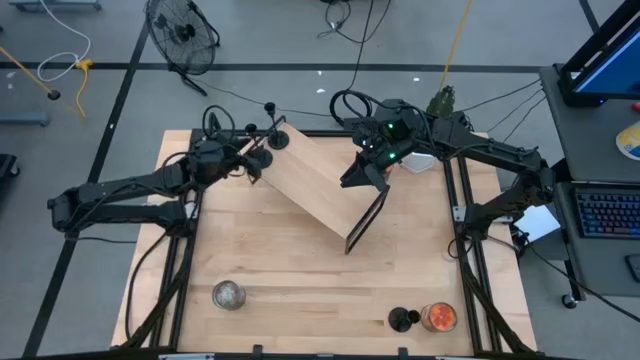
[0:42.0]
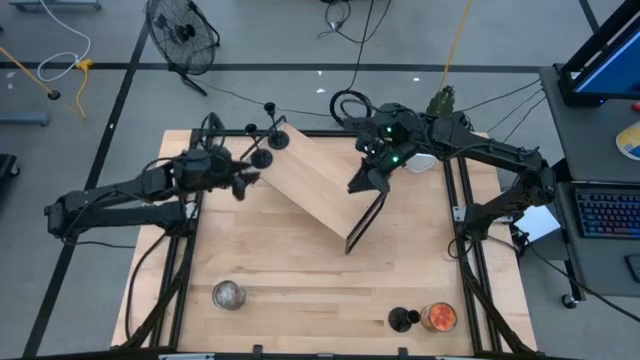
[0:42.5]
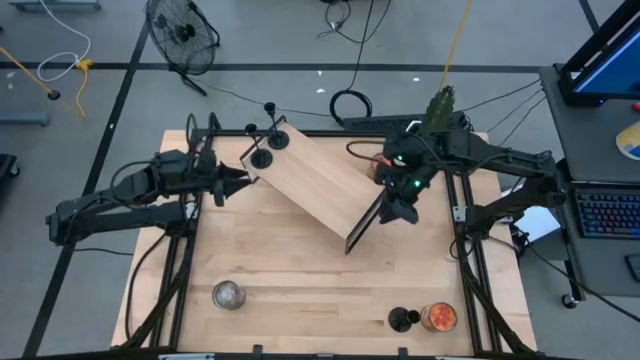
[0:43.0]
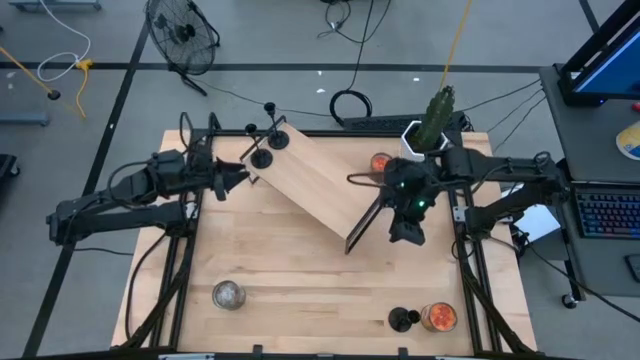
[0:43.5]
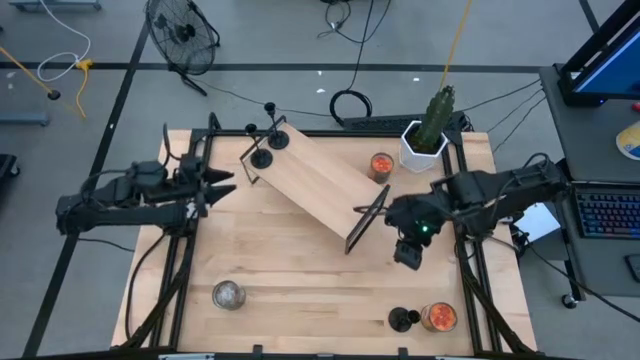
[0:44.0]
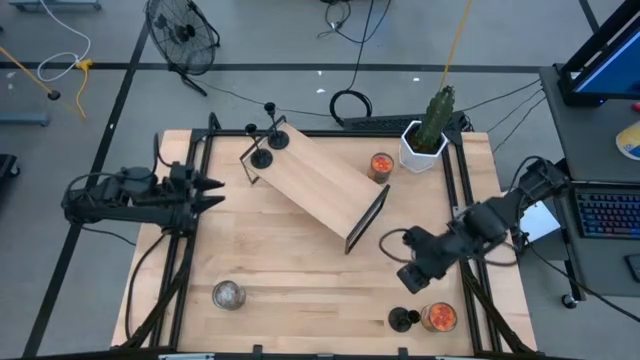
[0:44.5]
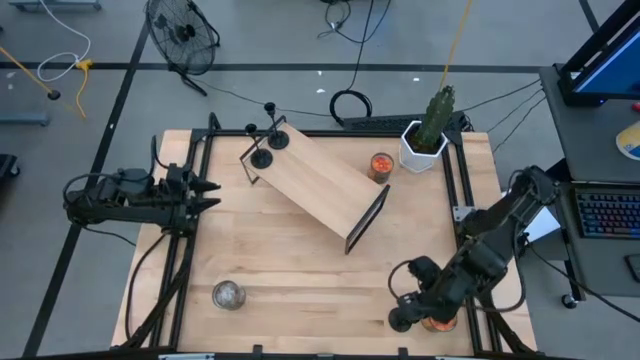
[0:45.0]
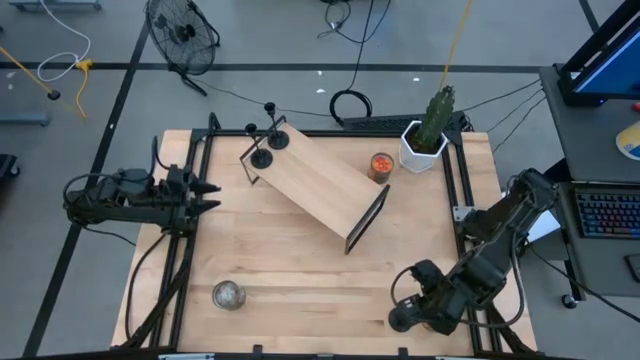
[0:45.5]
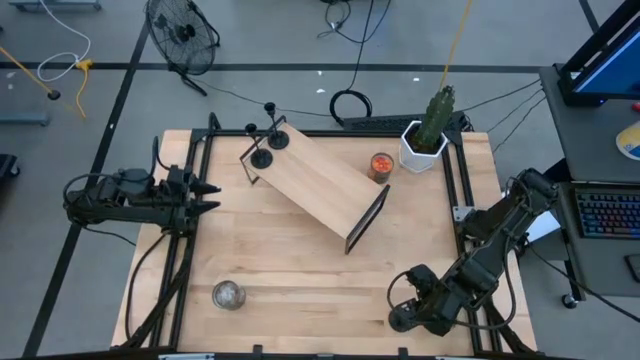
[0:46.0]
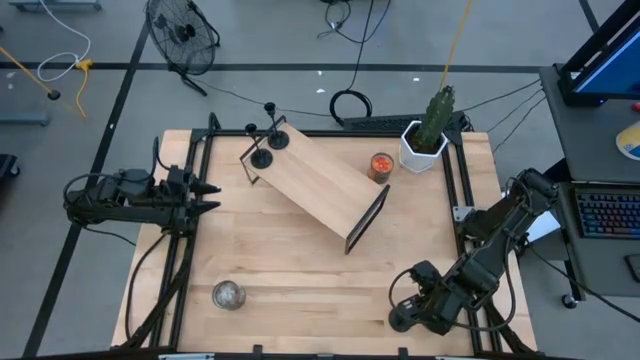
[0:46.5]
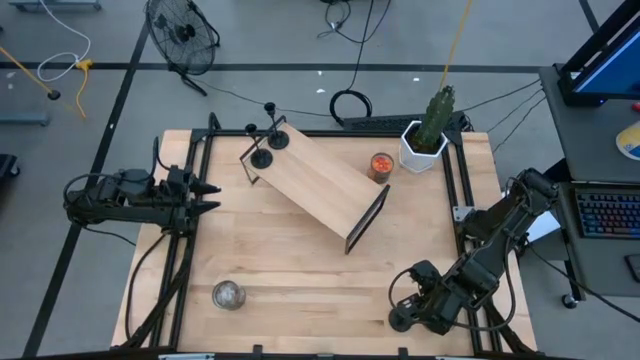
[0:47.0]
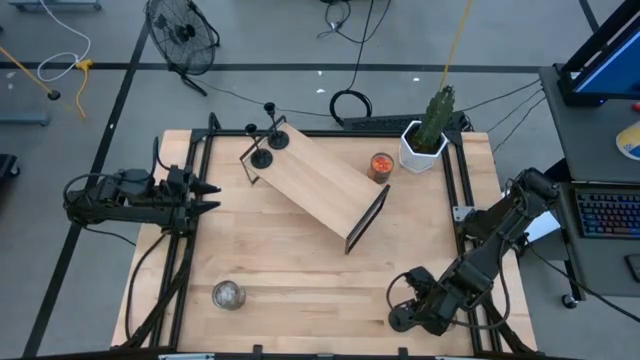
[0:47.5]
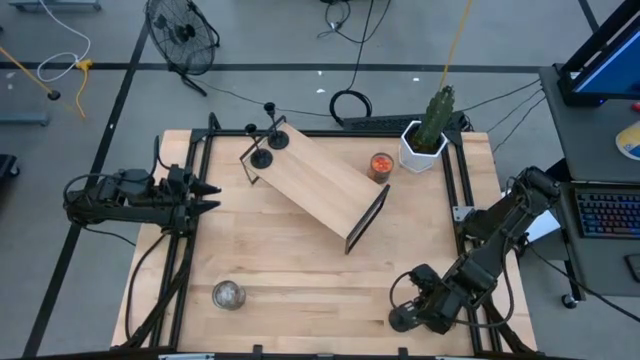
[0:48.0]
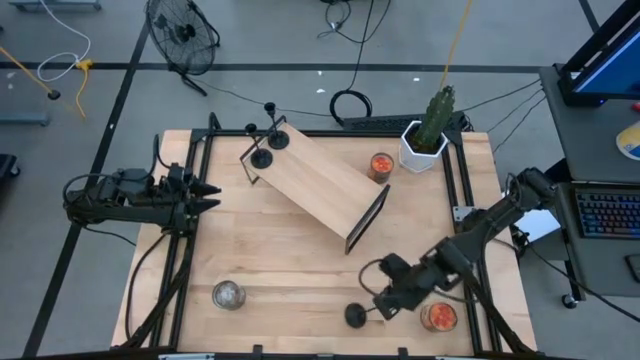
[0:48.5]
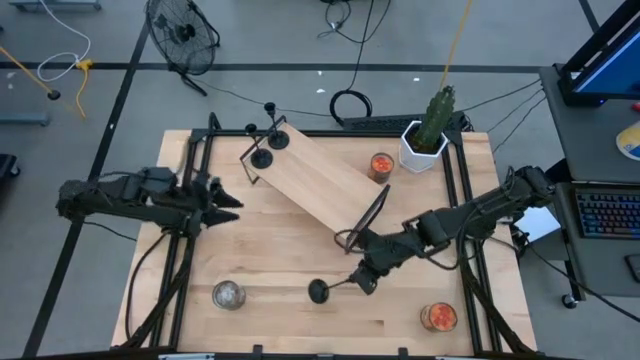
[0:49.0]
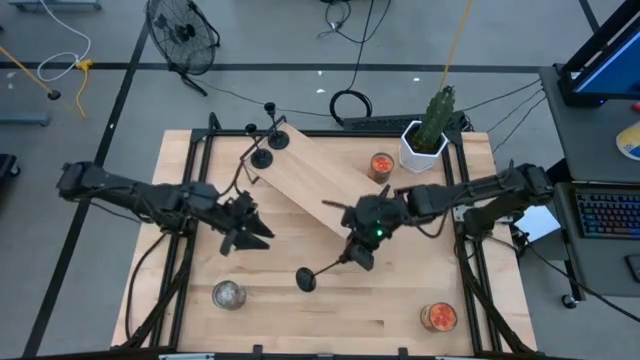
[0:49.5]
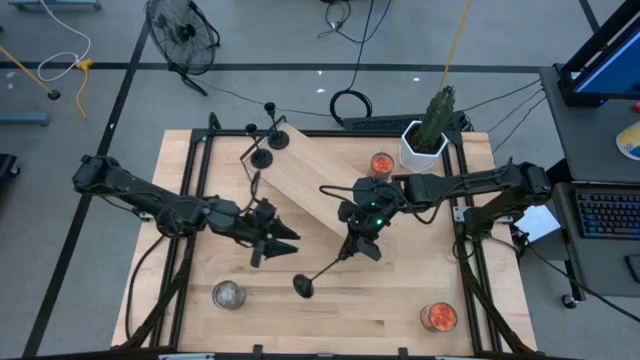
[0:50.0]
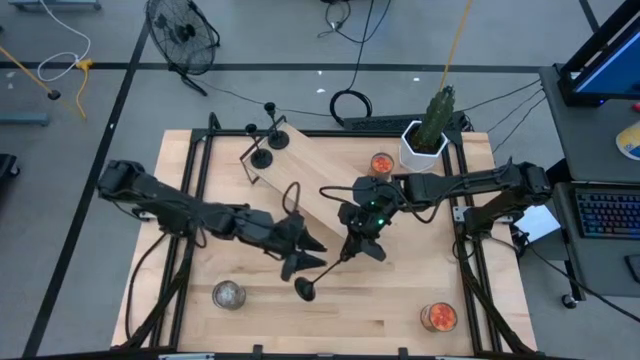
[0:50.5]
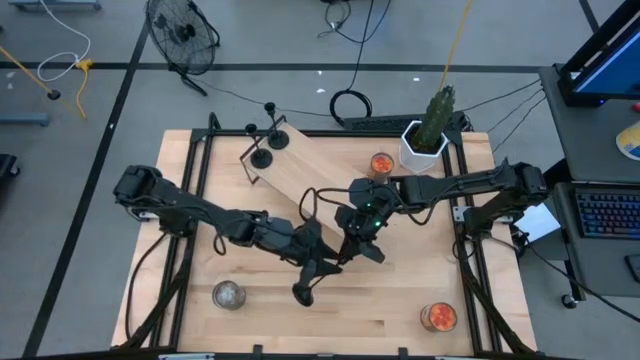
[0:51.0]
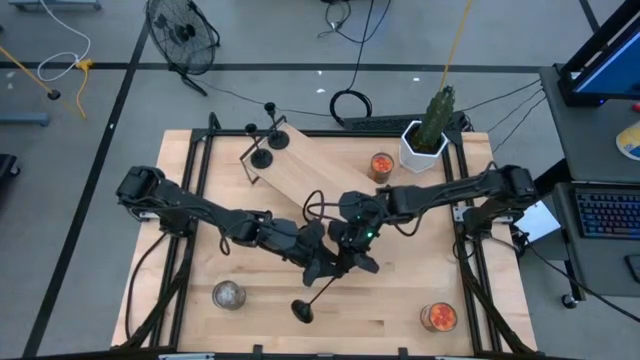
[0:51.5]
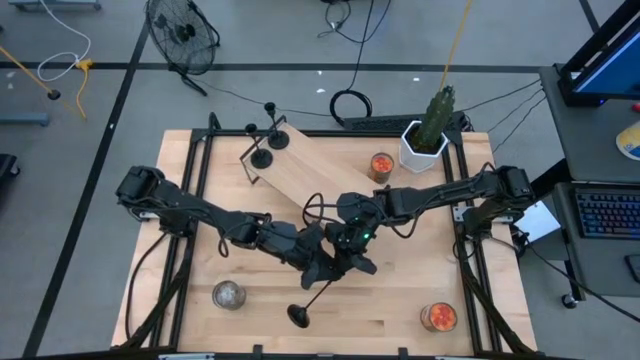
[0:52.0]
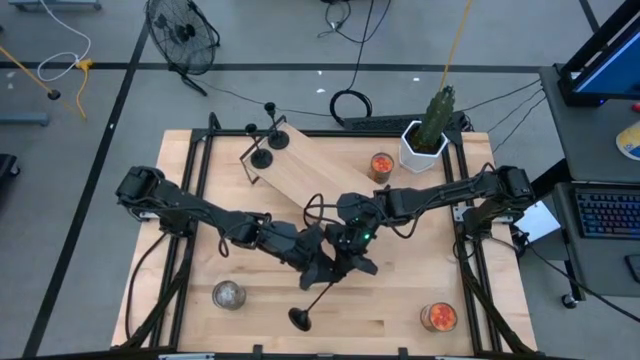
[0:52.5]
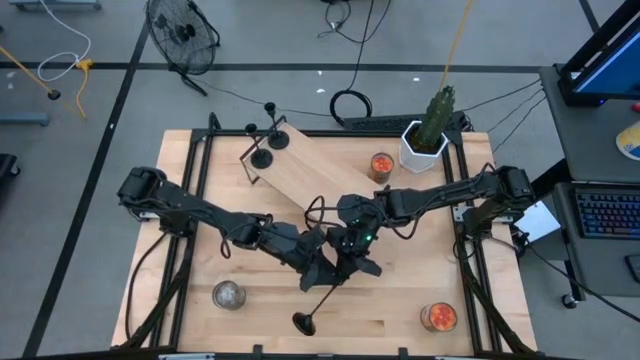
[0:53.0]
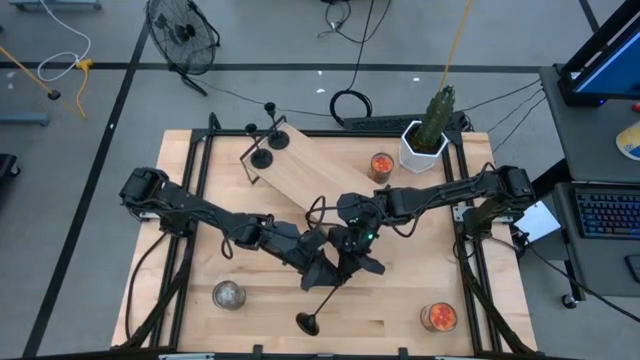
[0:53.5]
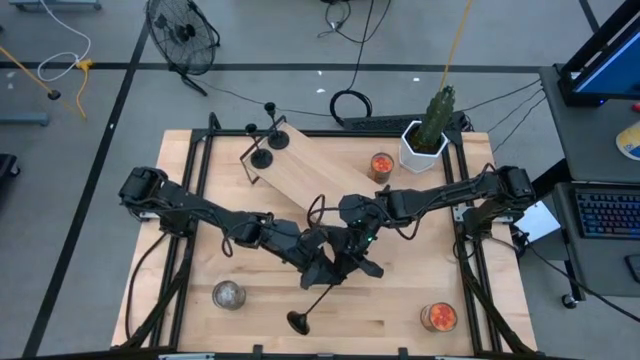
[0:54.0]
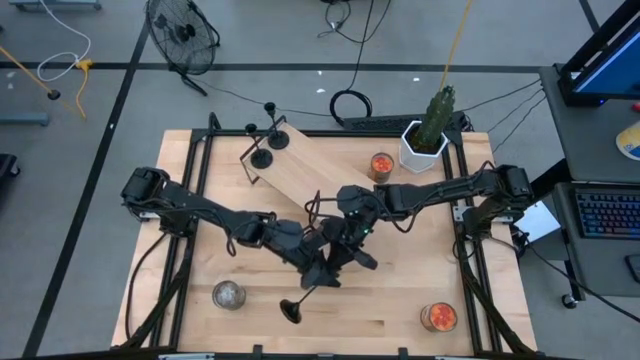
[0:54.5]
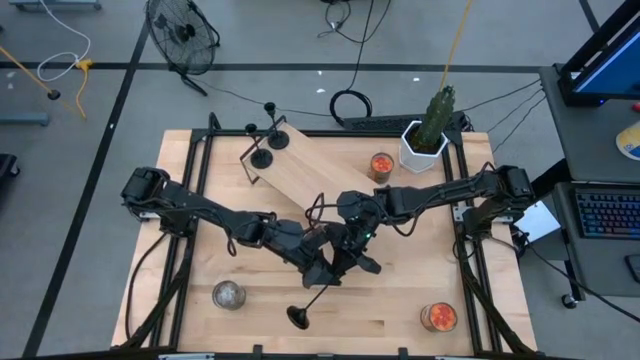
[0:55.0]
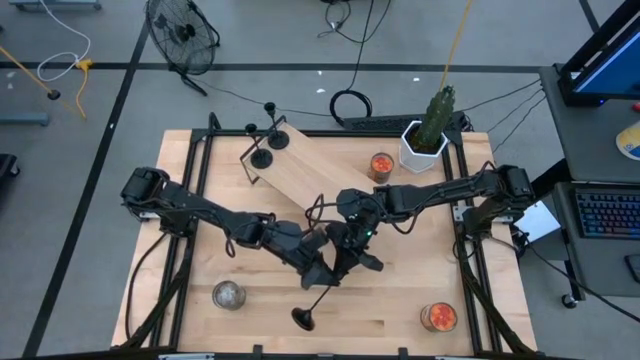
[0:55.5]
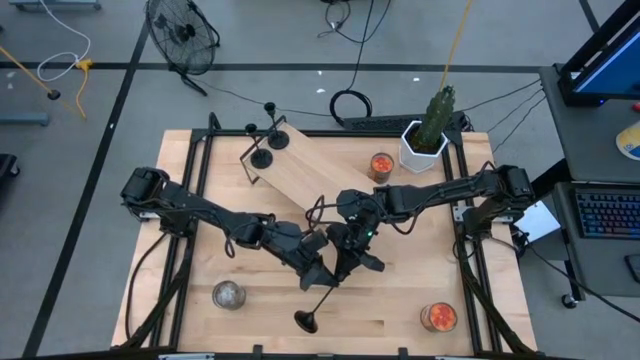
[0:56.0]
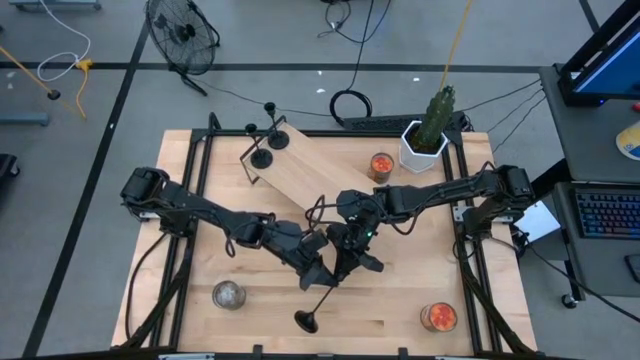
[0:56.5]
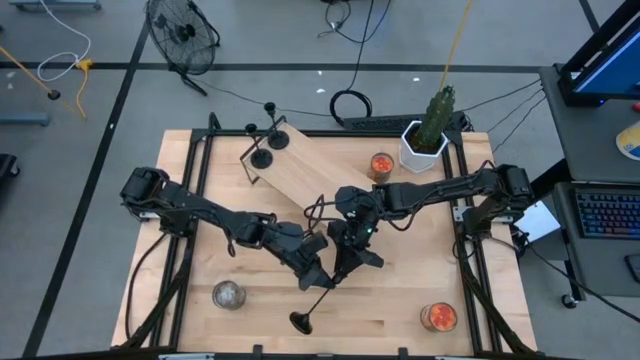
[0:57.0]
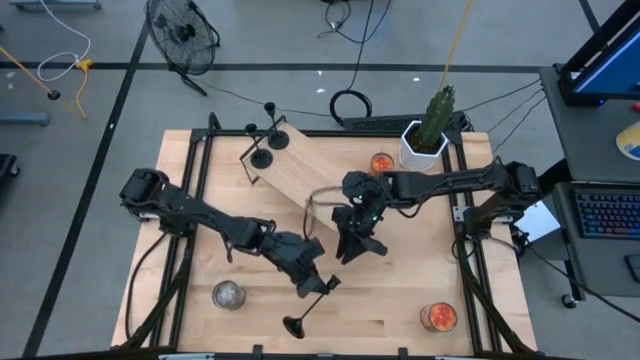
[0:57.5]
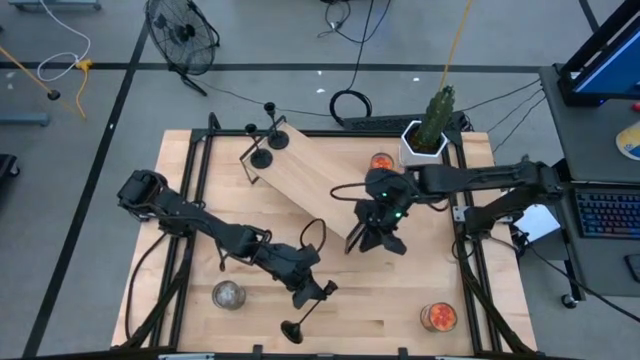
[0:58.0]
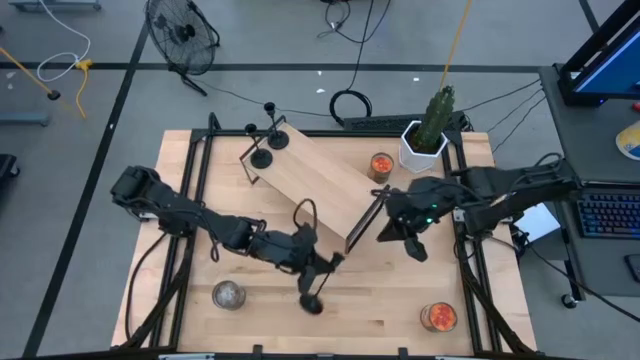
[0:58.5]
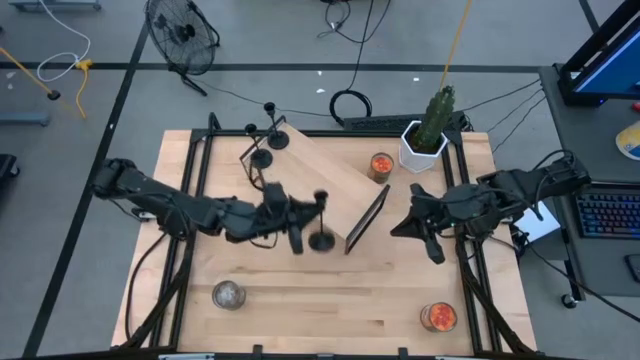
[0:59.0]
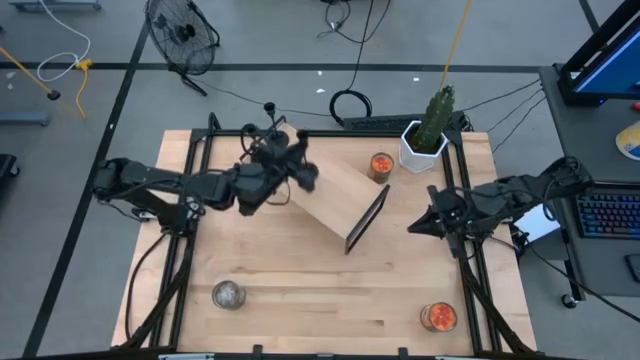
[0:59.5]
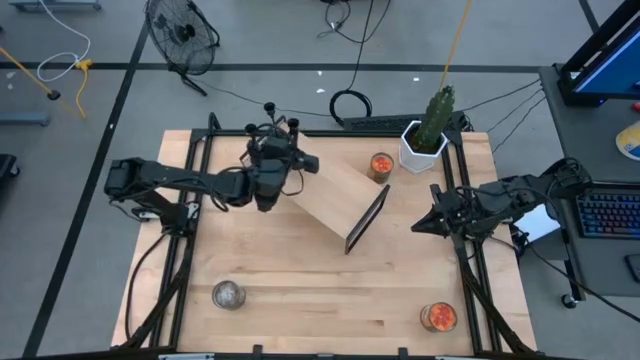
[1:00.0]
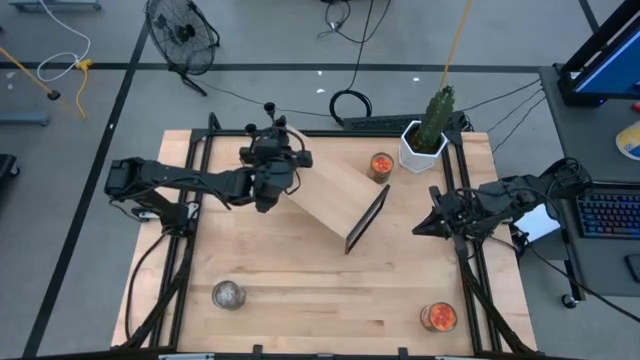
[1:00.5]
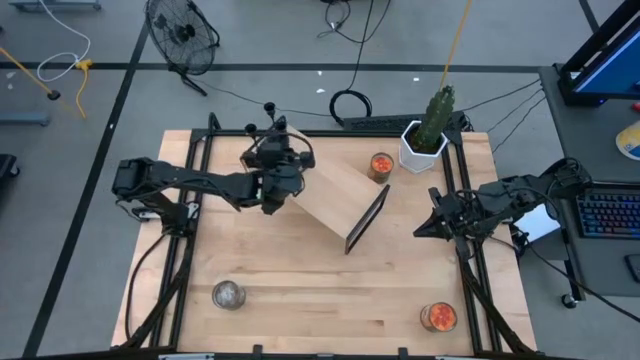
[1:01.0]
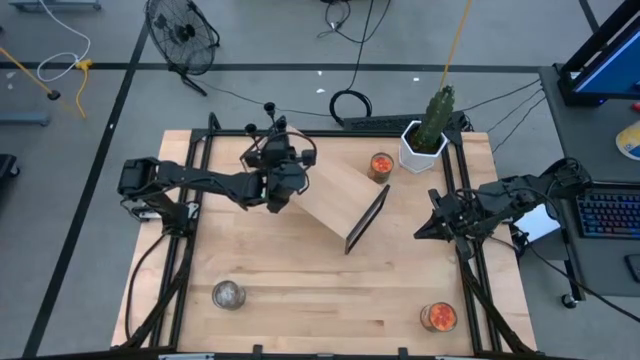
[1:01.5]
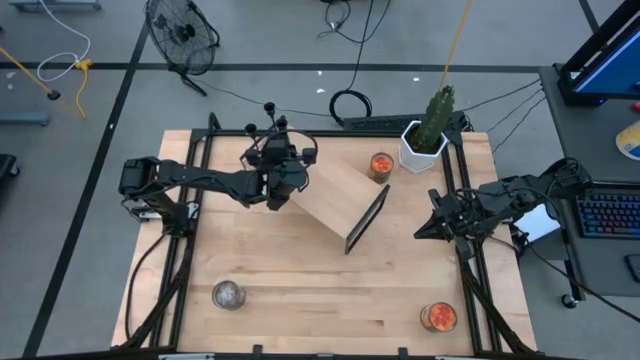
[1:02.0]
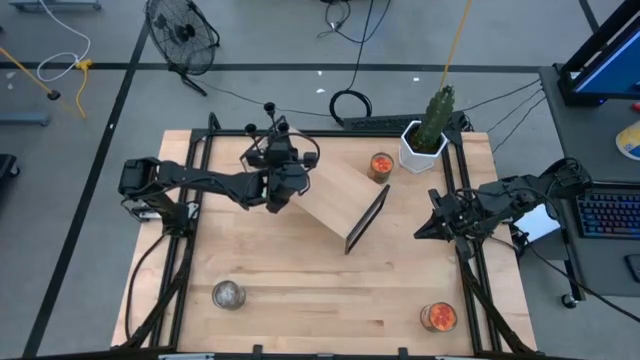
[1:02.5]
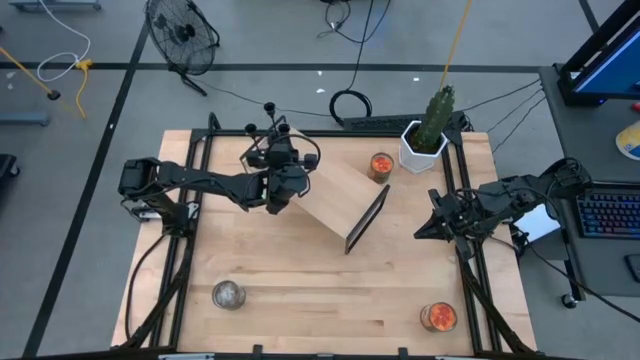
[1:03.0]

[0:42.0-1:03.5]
Task: Pick & Place candle stick holders
Put the candle holder on the shelf
